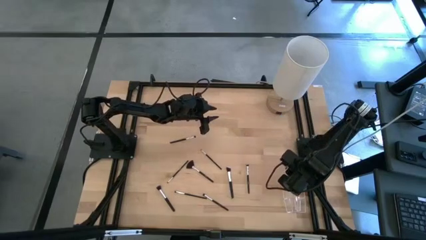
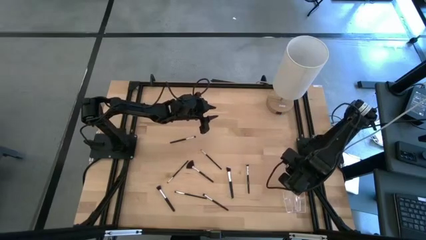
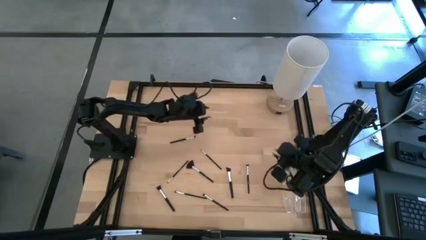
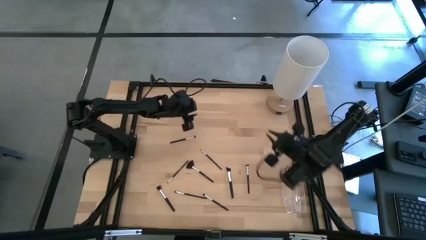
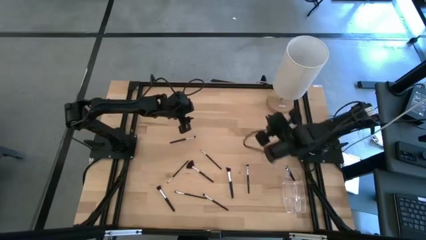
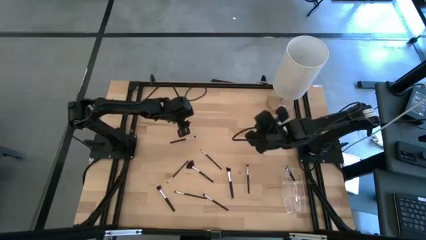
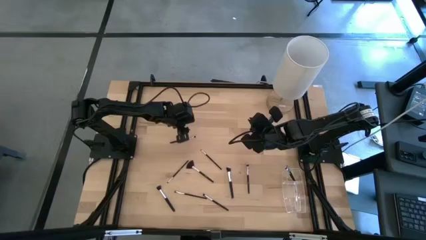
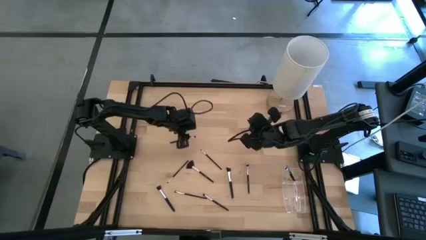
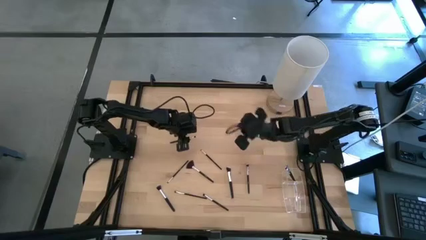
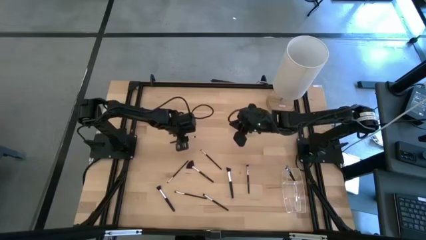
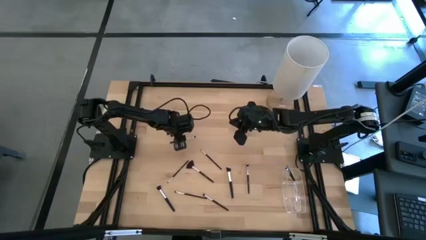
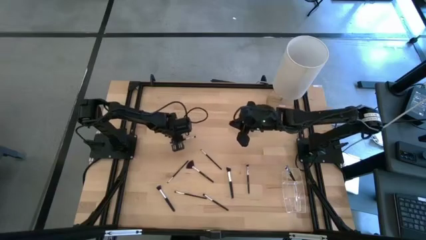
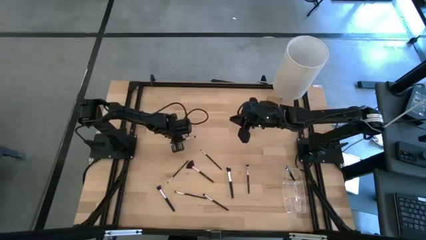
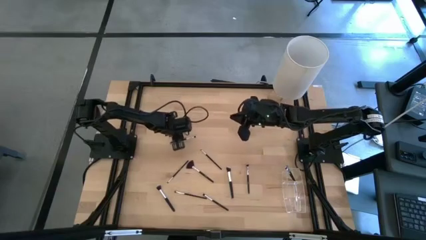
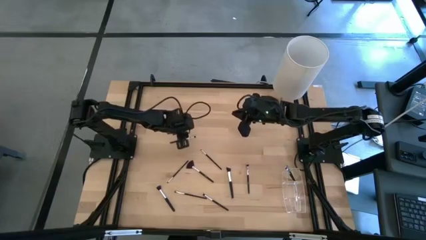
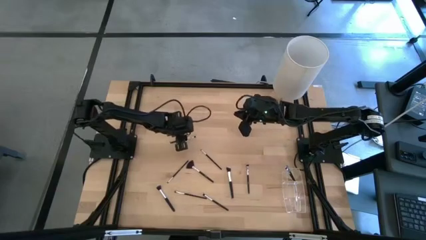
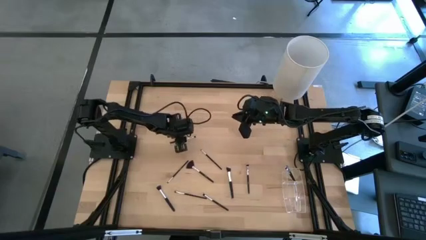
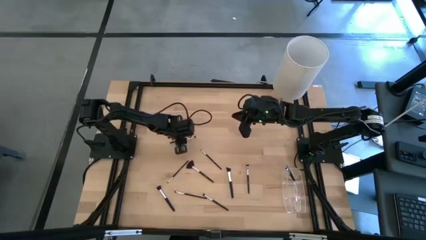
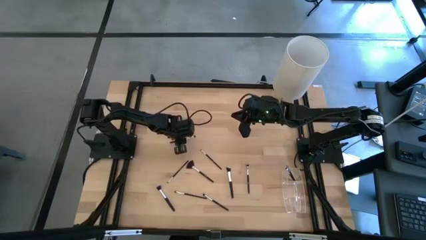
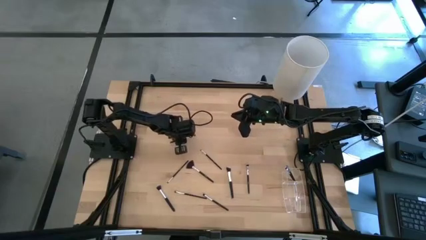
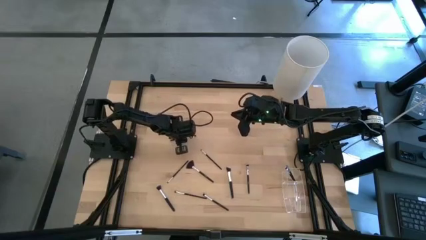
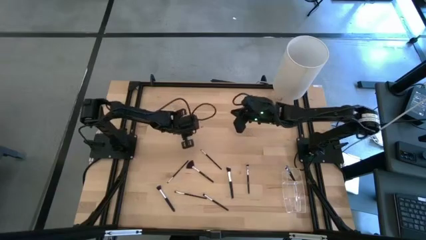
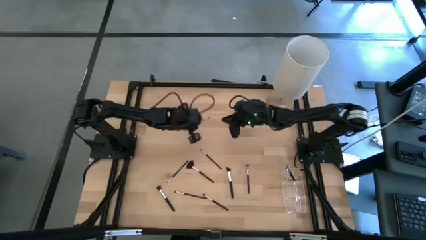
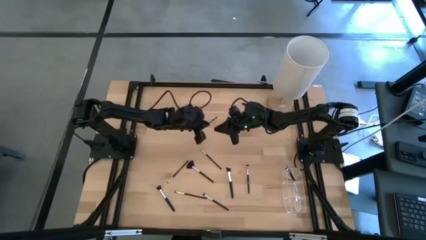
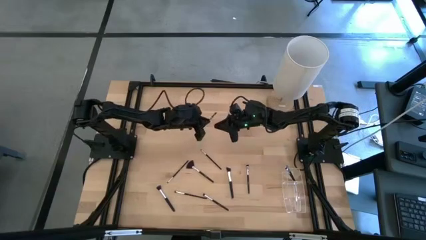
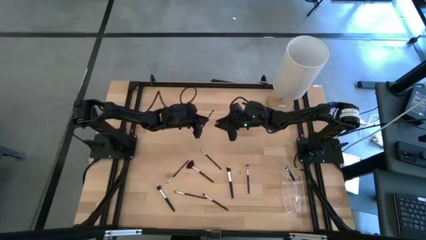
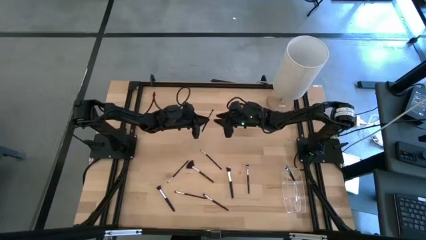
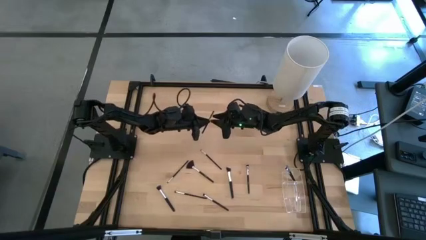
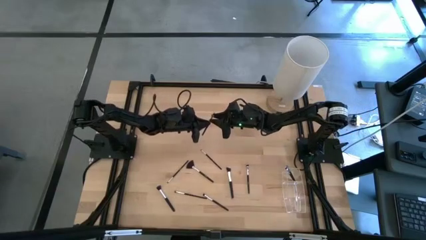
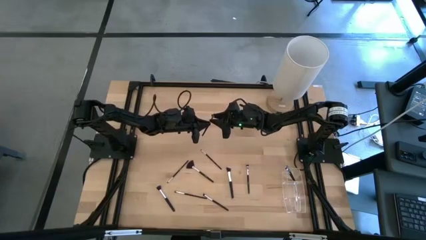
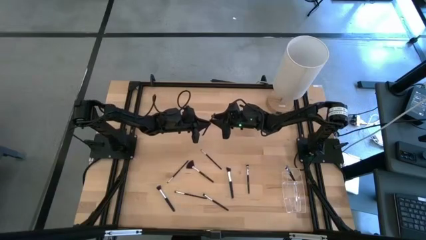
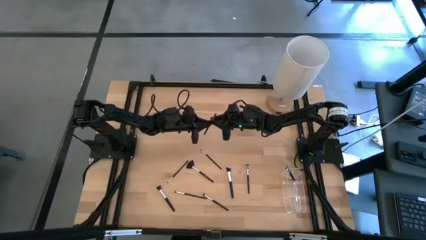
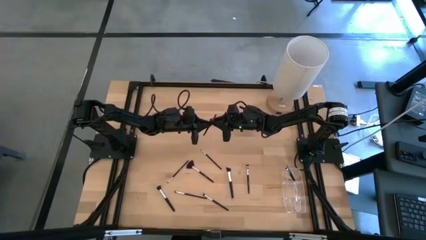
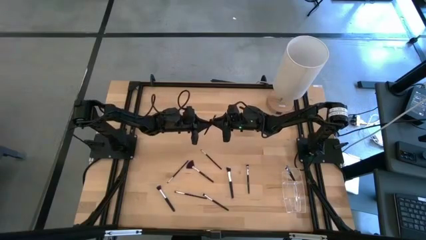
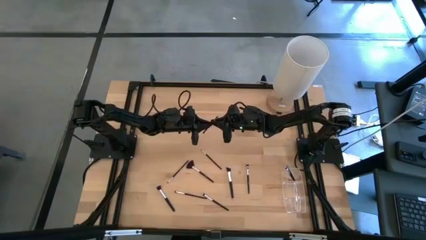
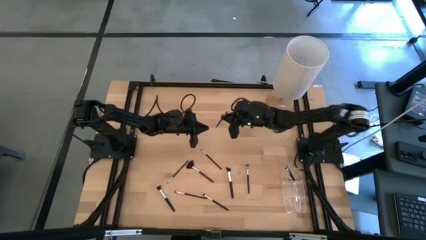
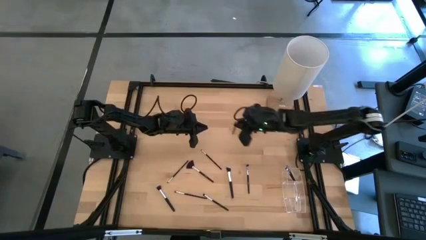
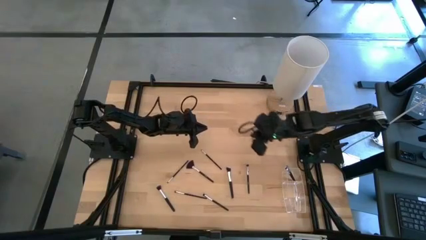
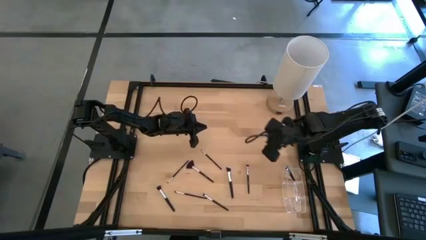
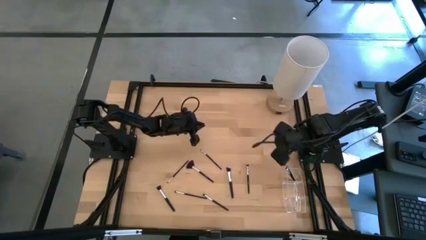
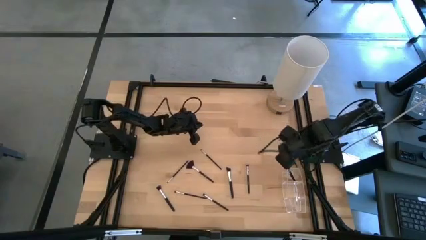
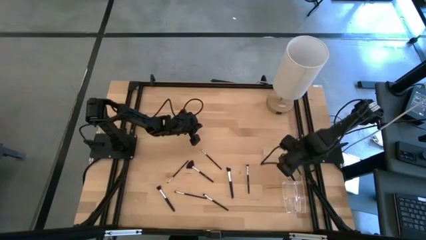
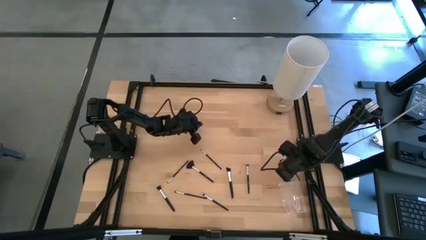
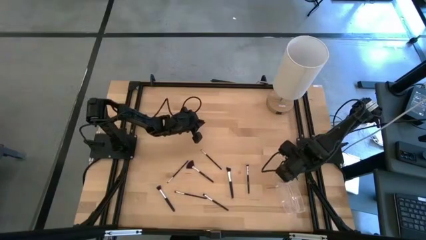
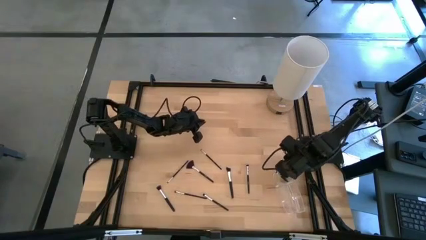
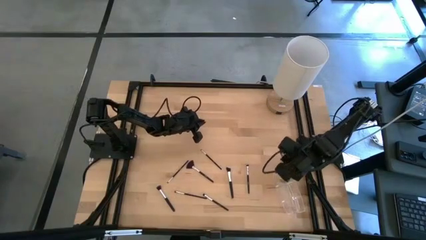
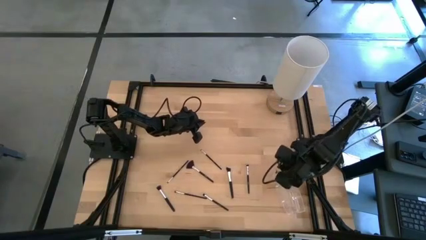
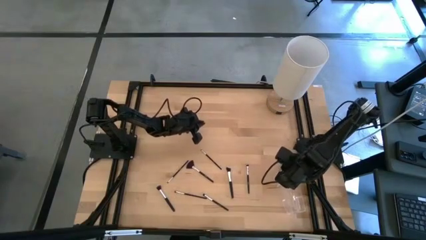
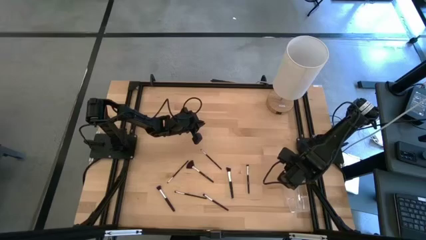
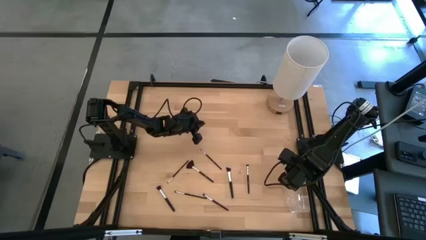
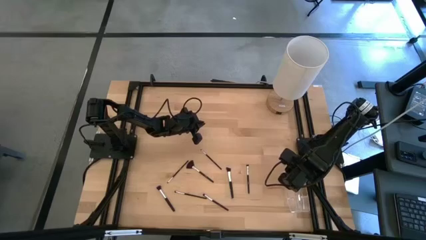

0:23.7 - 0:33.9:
Task: Put items in baskets/containers
Put the foundation brush into the left section of the transparent organizer
